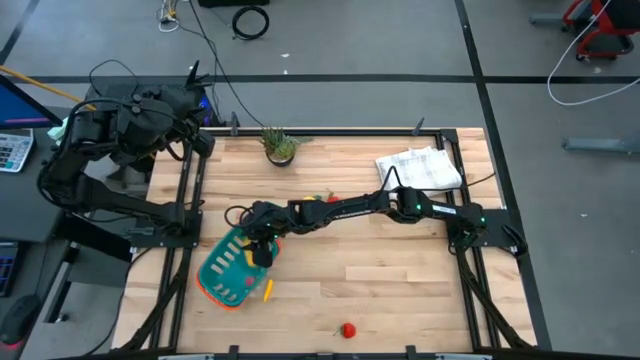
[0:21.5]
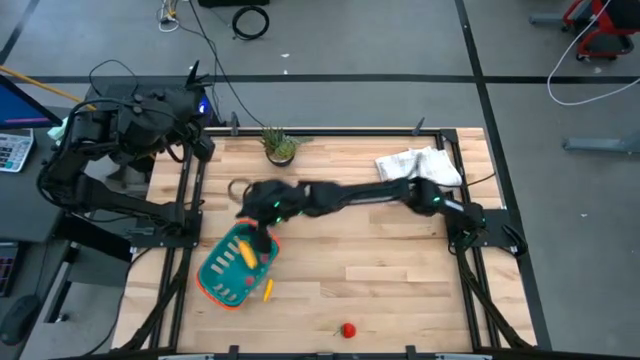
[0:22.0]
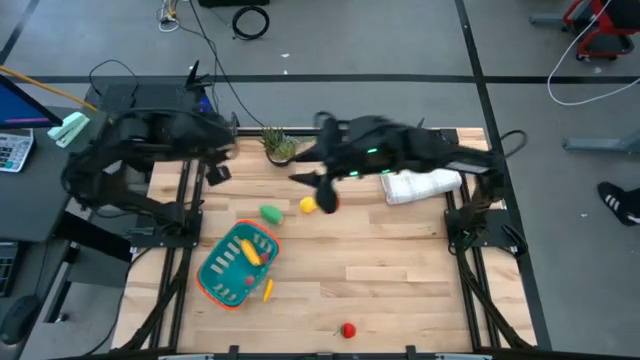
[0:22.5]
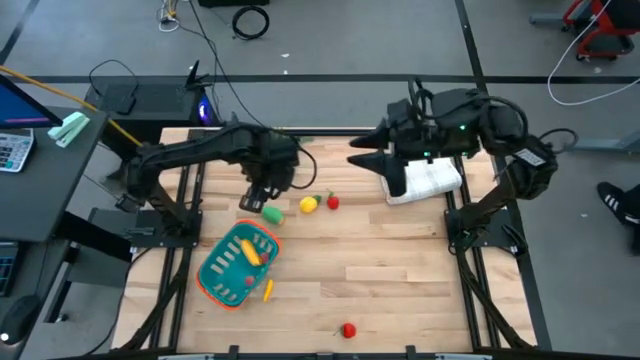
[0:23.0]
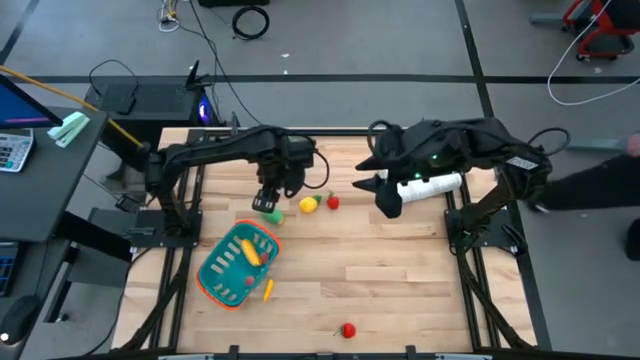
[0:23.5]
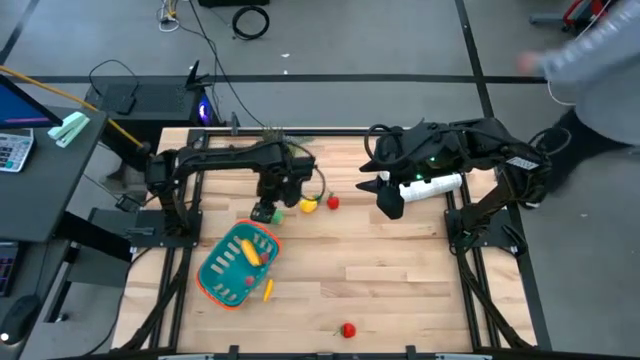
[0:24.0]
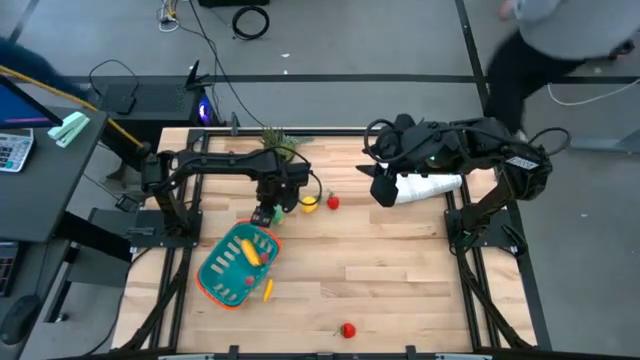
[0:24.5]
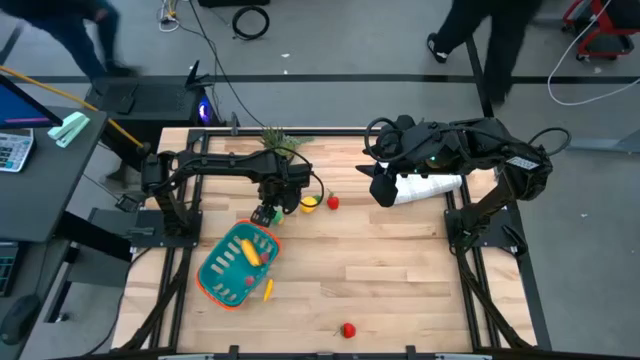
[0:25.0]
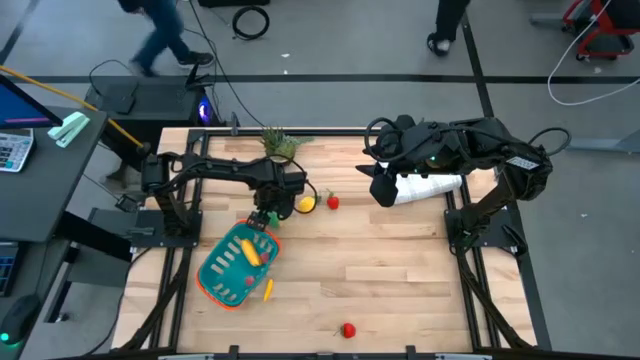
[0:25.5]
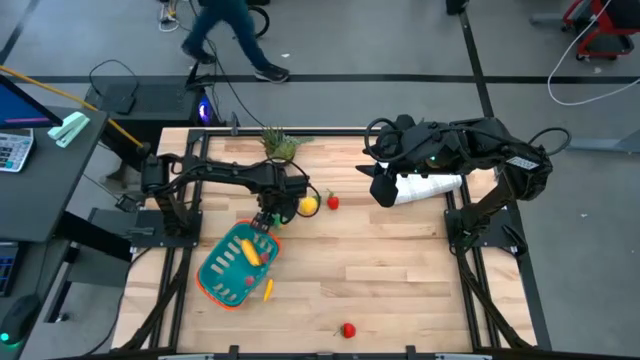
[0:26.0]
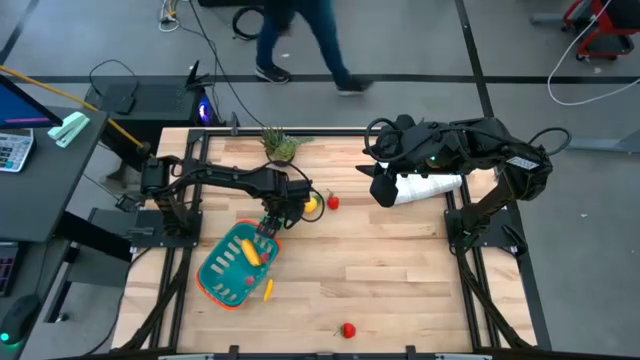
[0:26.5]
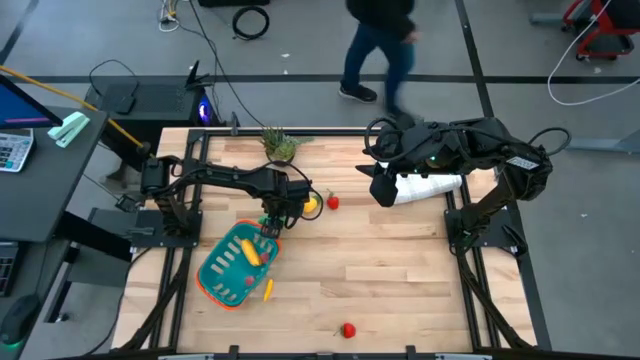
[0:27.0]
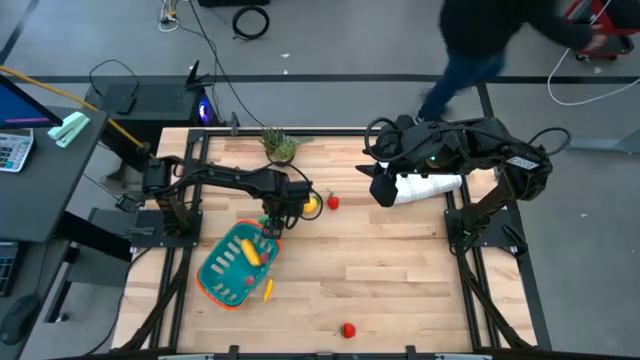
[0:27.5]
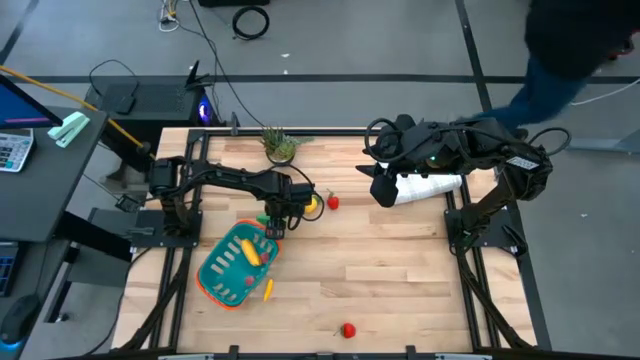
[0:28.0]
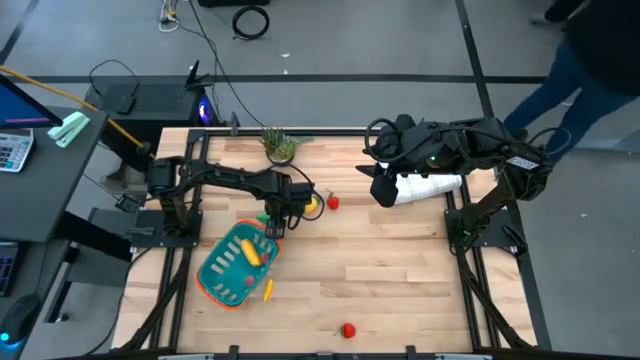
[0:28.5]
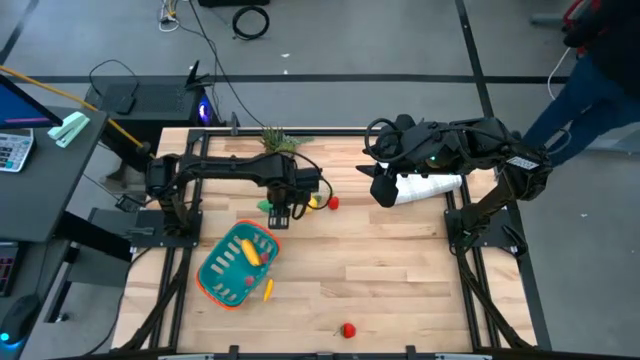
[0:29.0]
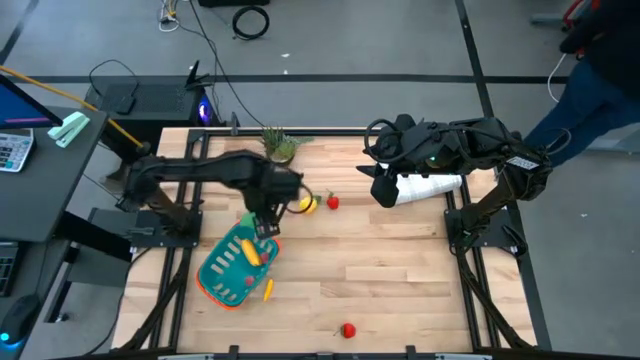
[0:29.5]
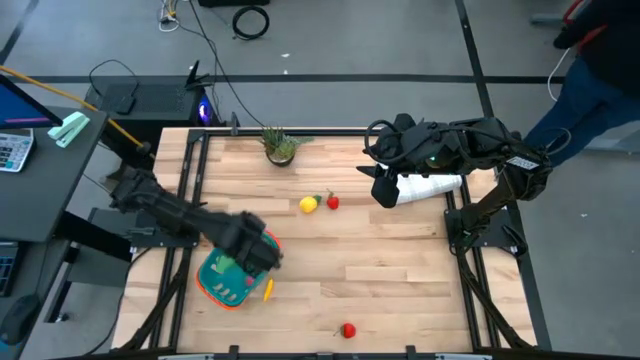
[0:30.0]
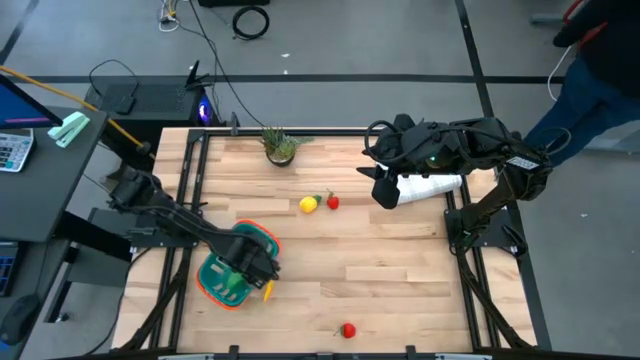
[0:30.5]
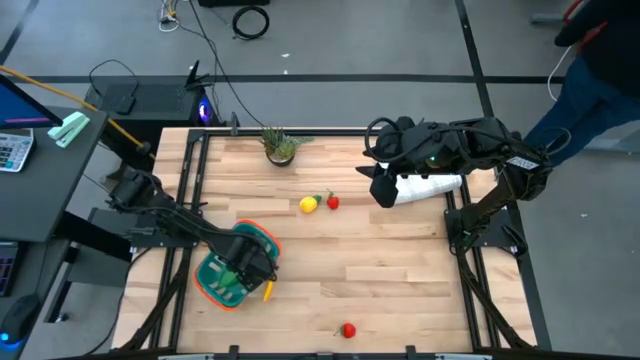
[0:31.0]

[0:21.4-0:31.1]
Task: Pick and placing Produce into tupperware
Put the green corn into the blue basket

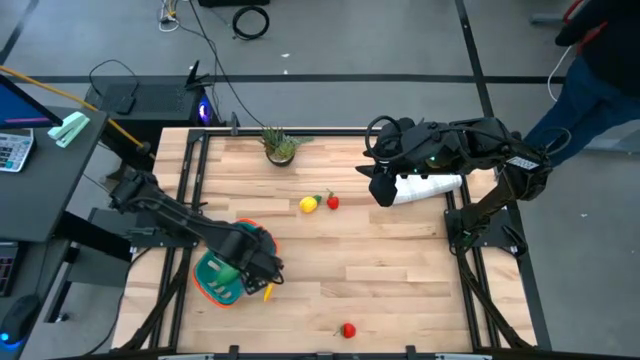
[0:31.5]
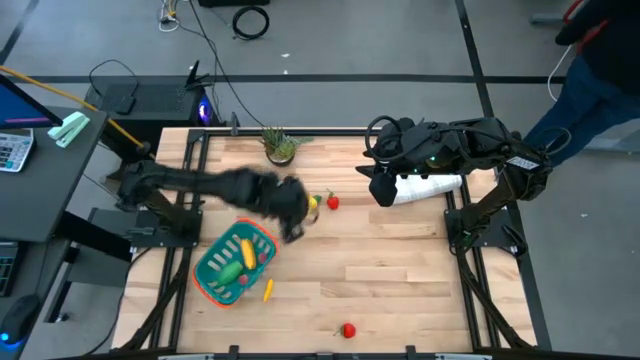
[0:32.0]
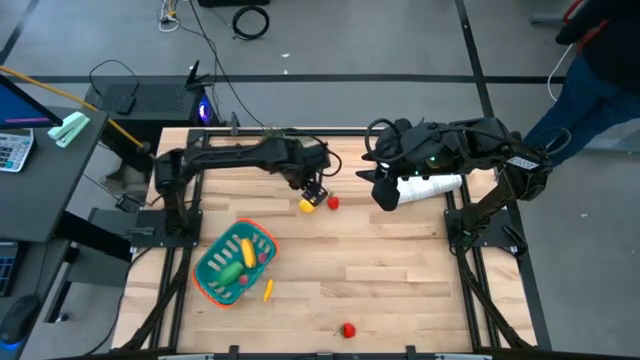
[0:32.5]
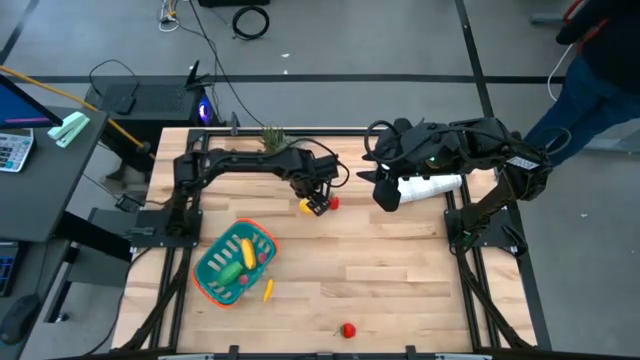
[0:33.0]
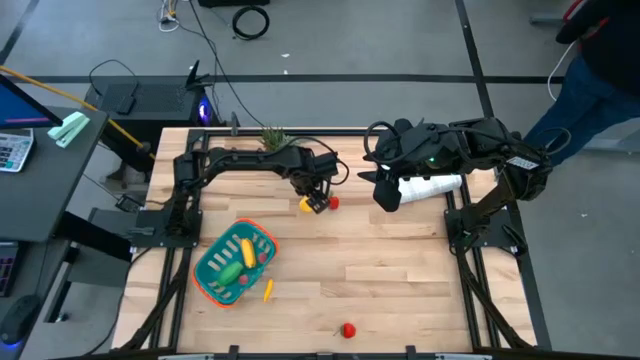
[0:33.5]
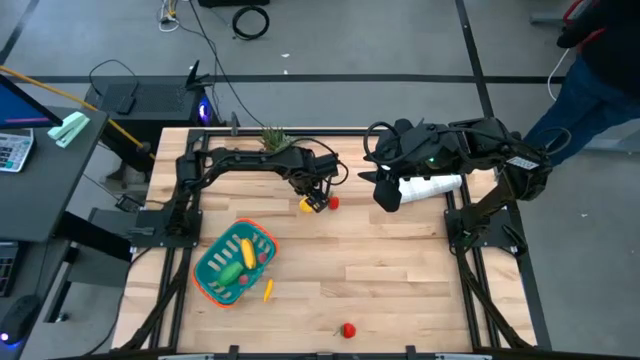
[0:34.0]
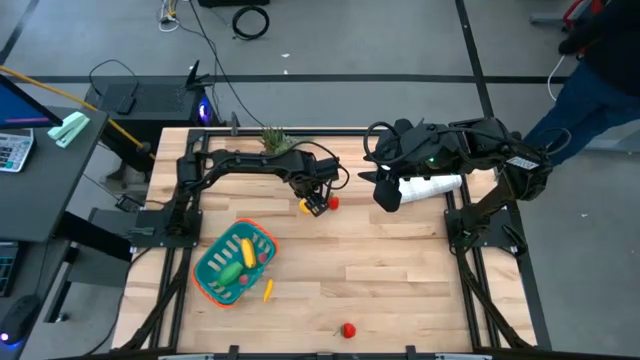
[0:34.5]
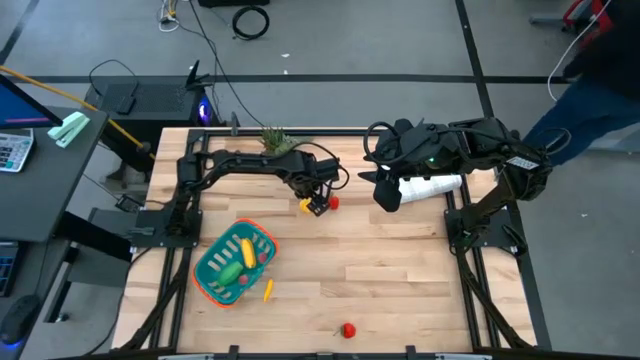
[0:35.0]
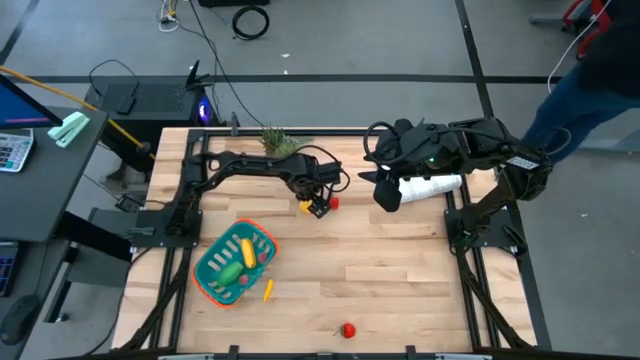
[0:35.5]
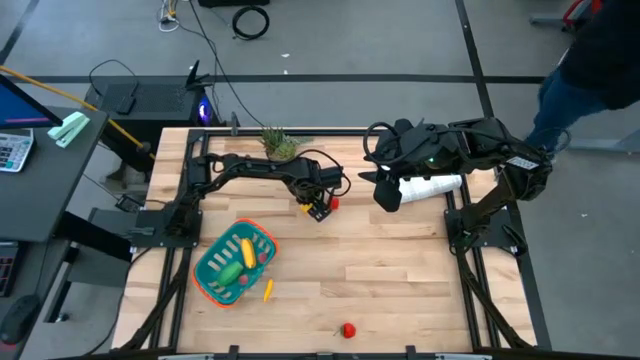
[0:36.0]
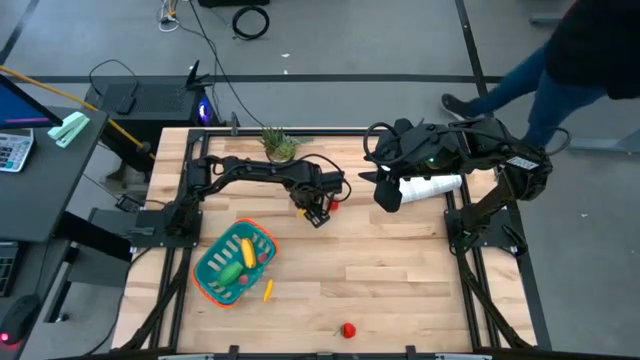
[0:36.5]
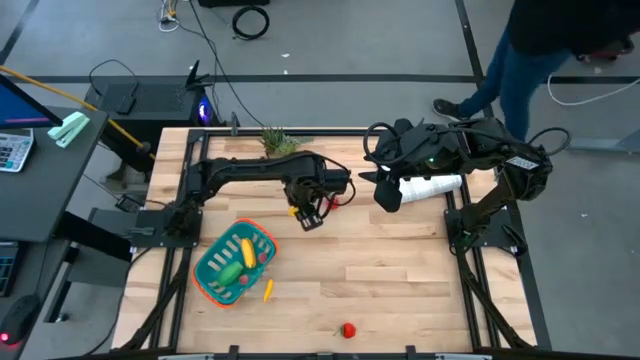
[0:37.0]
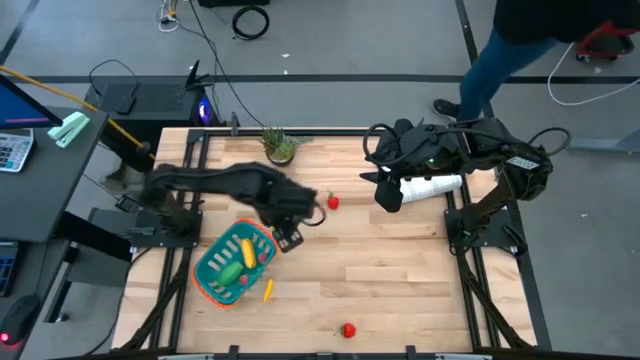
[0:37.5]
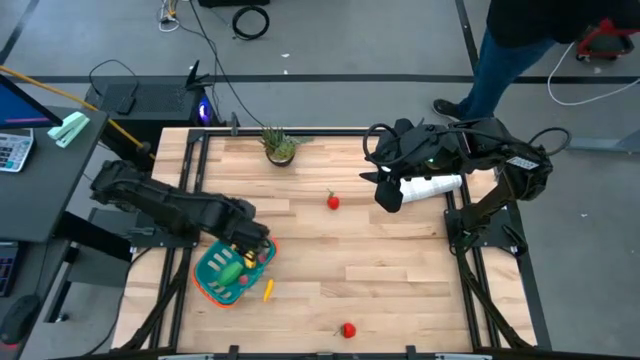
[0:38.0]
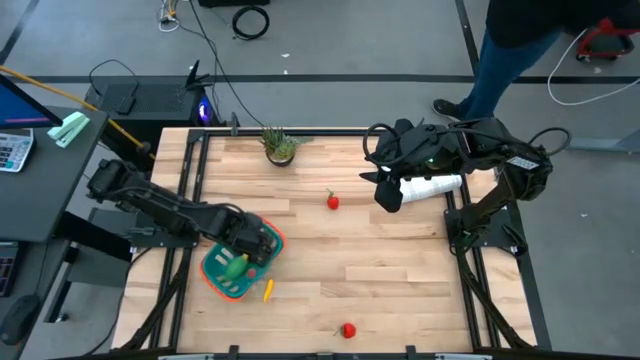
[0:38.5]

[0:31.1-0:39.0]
Put the yellow pineapple into the blue basket

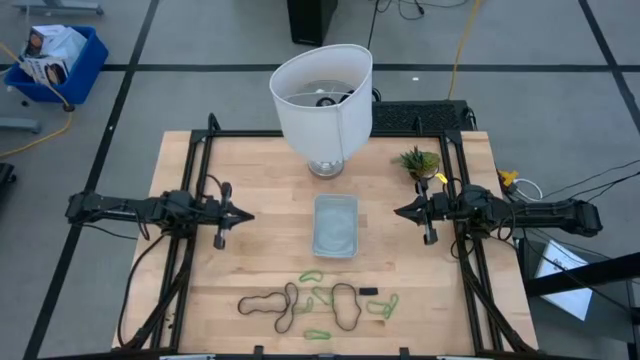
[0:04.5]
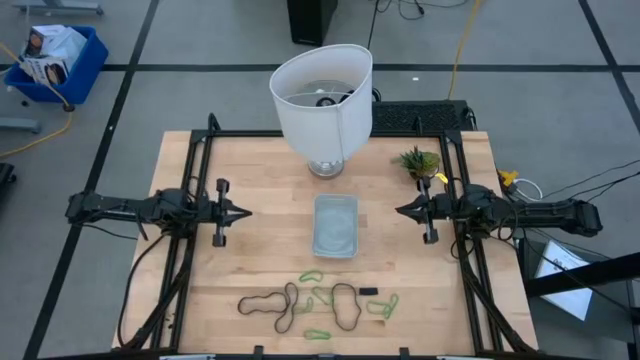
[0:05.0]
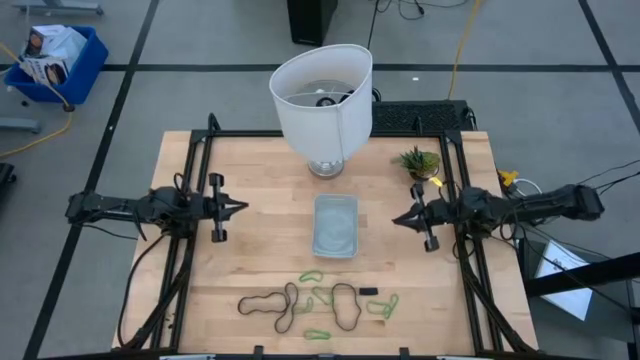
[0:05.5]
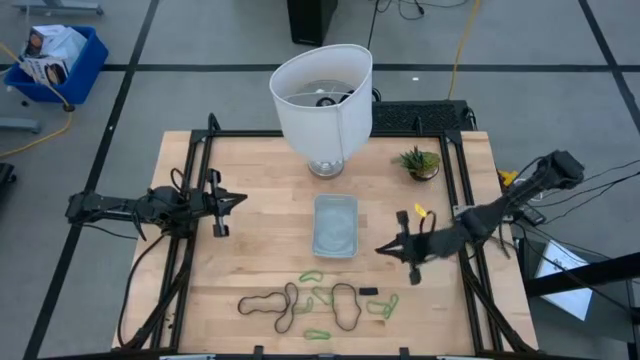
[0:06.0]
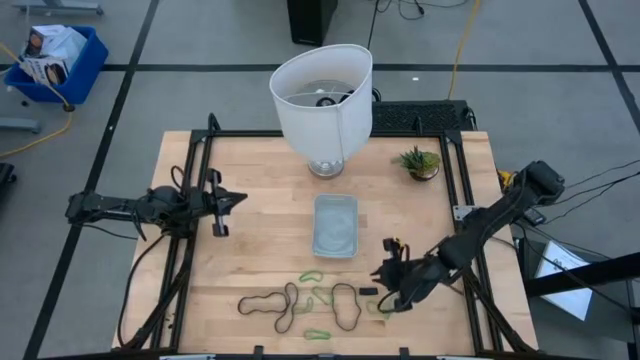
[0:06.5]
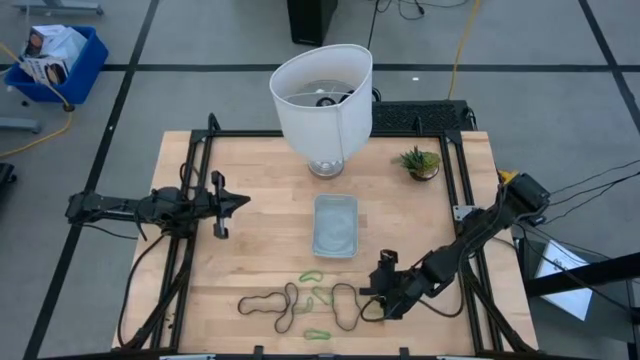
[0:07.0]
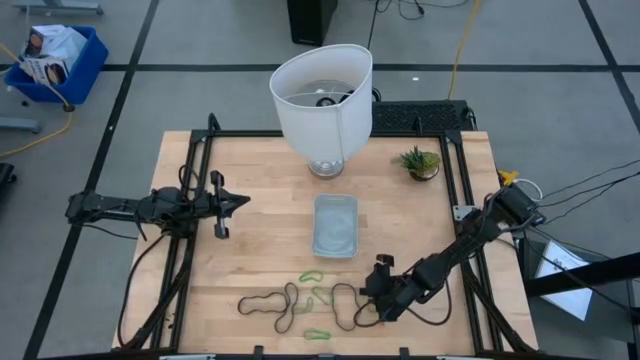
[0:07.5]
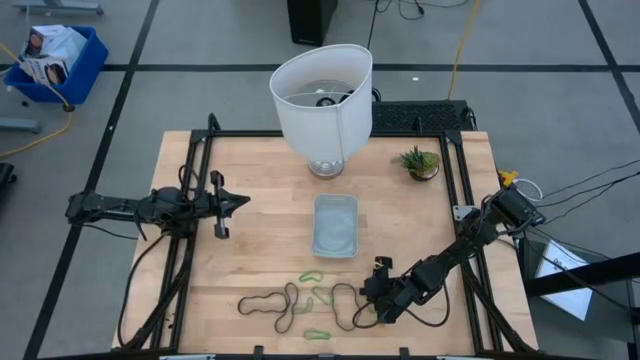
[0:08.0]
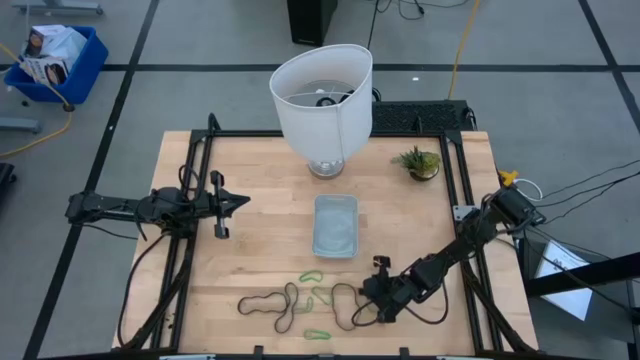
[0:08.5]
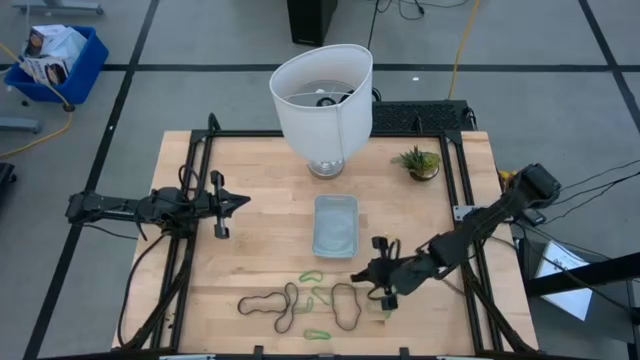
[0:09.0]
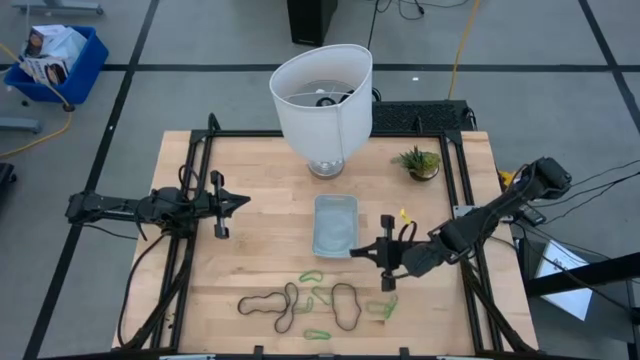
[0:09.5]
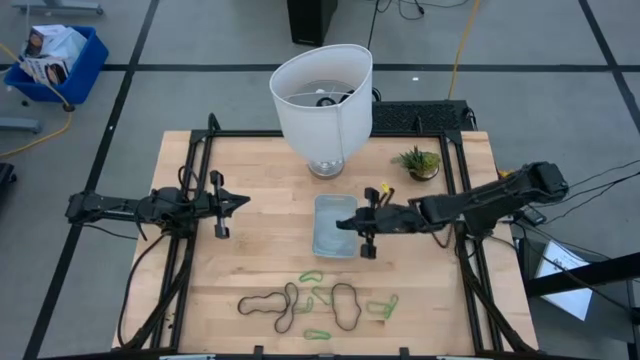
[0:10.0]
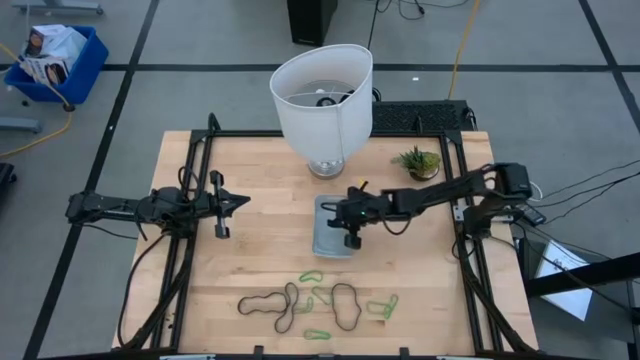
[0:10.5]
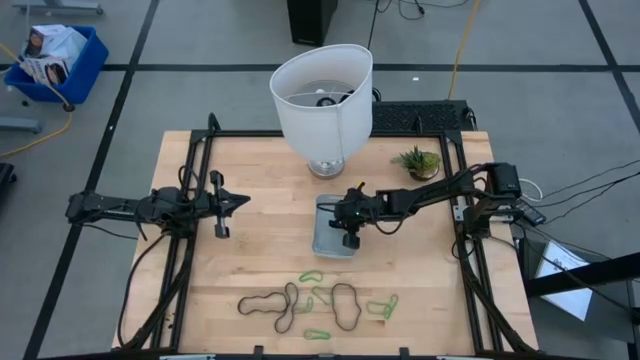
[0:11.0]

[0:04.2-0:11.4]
Task: Pick and place rubber bands into bin
Put the black rubber band into the gray bin
